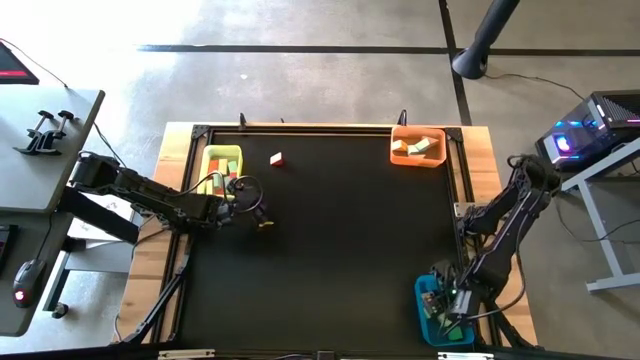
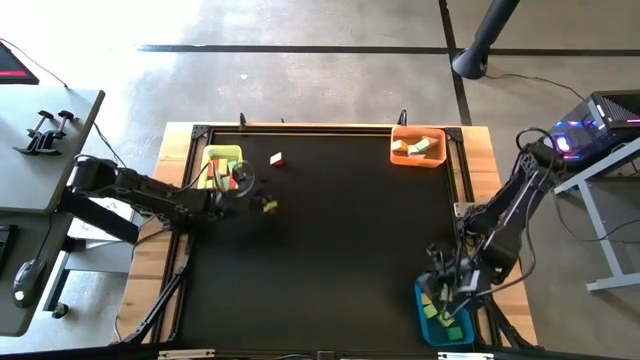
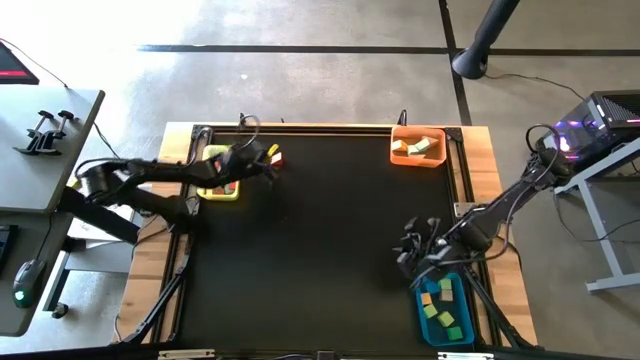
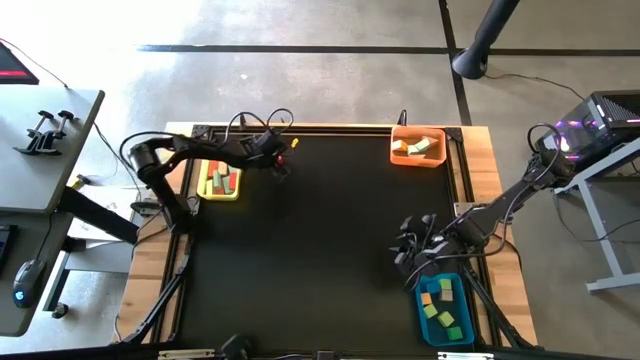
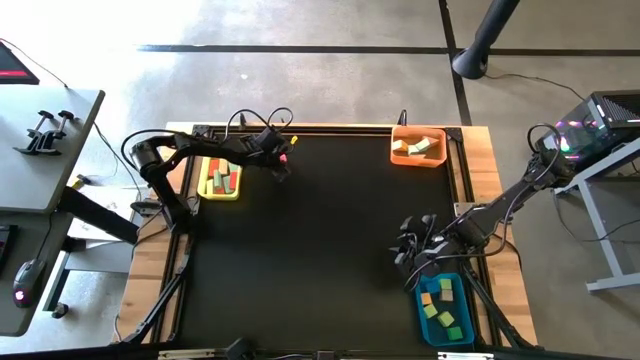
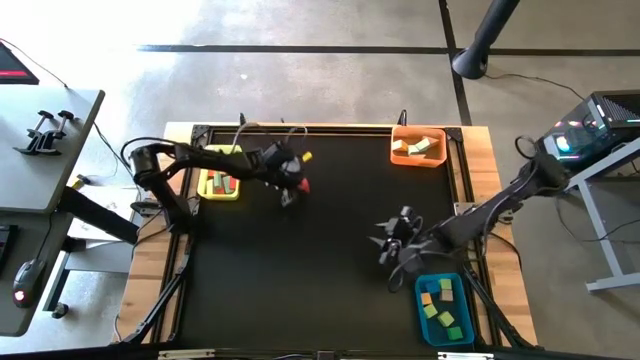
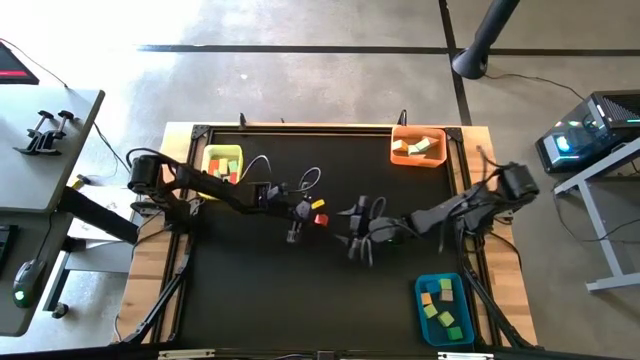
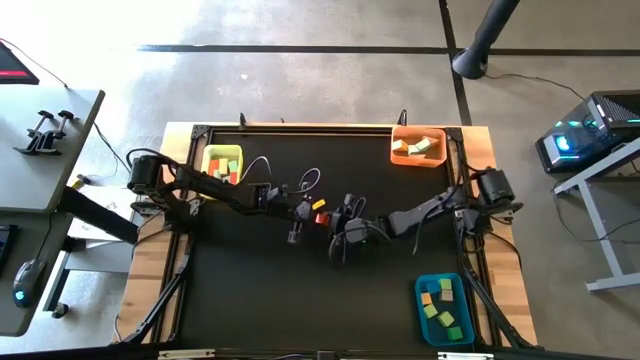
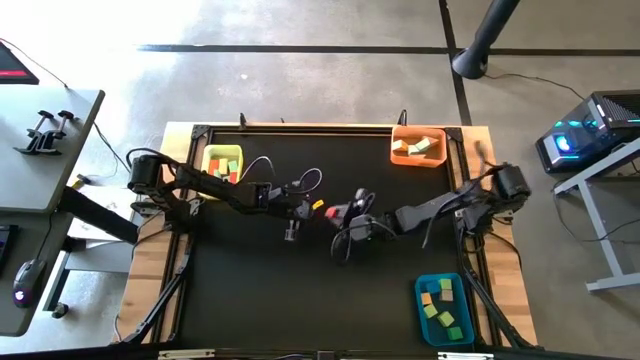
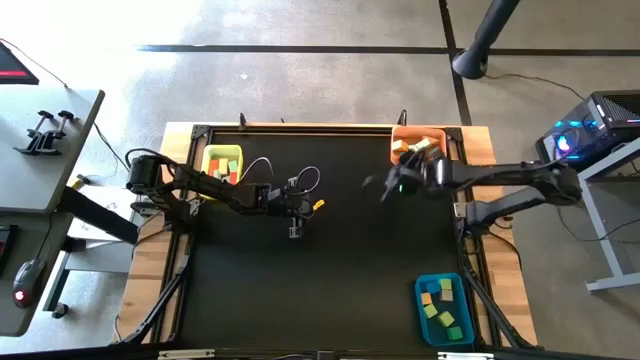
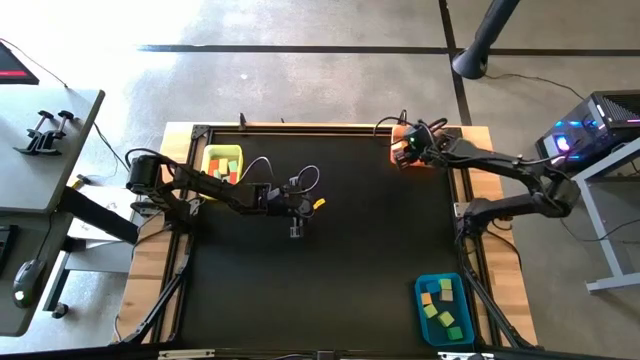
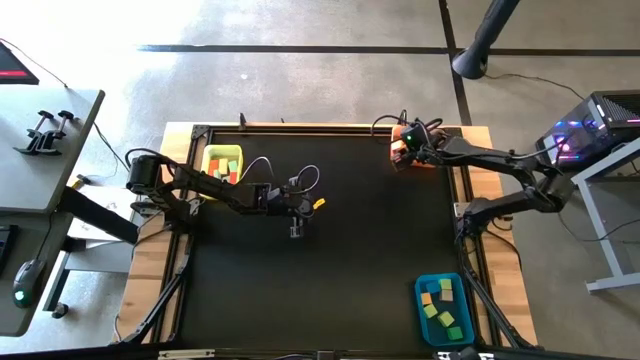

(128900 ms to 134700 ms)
Task: Sort blocks by size
Put the orange triangular block into the orange bin

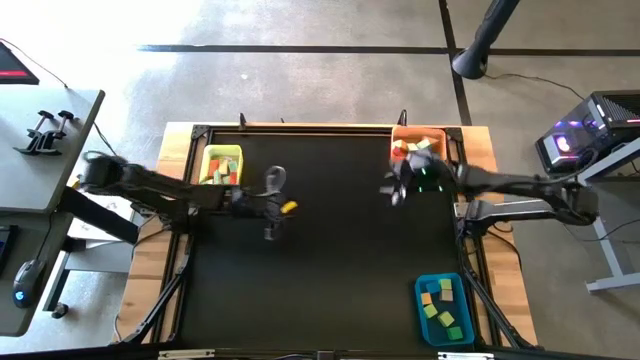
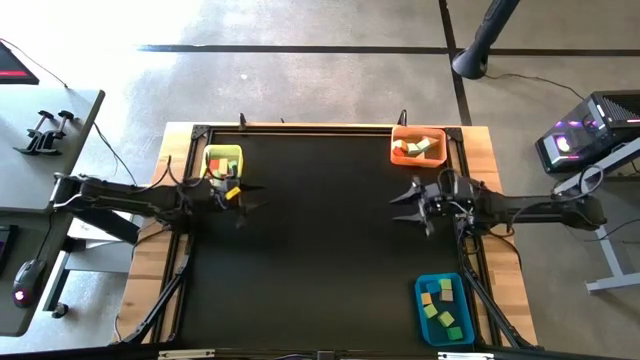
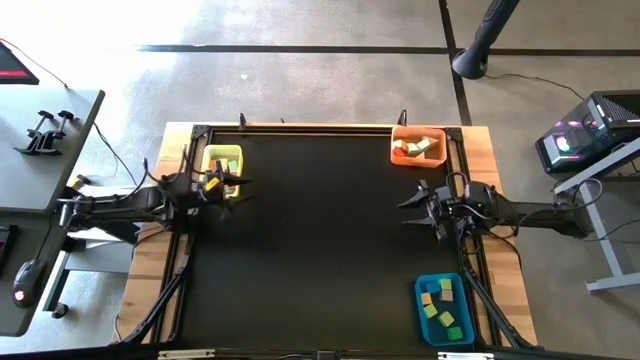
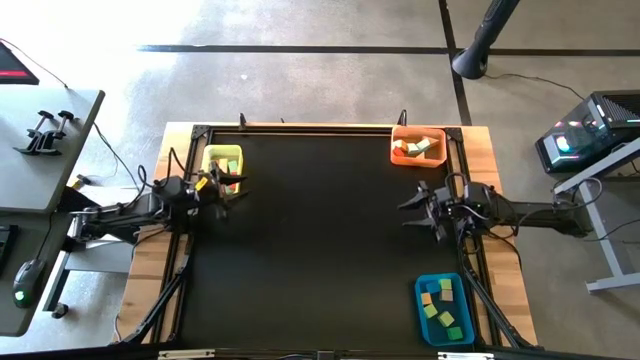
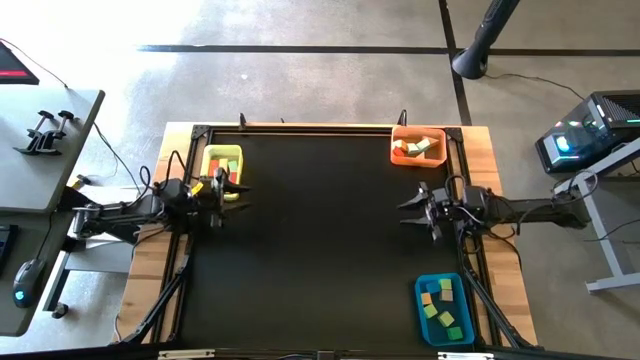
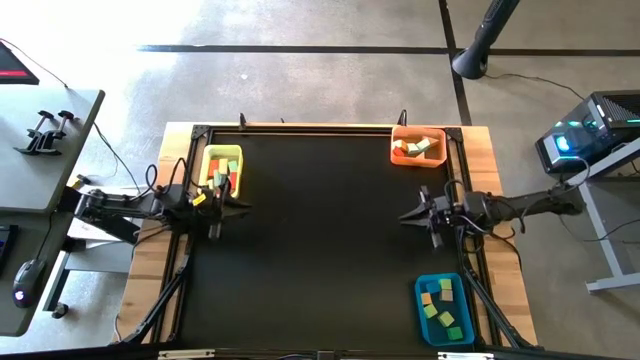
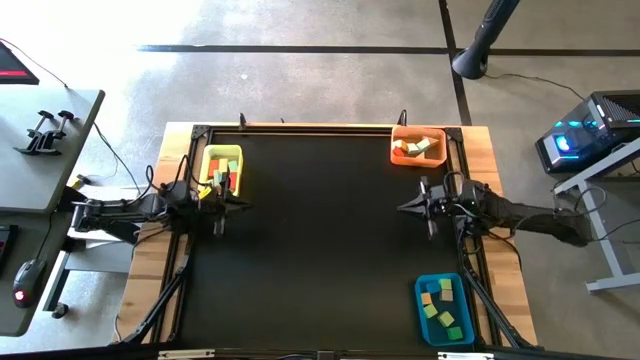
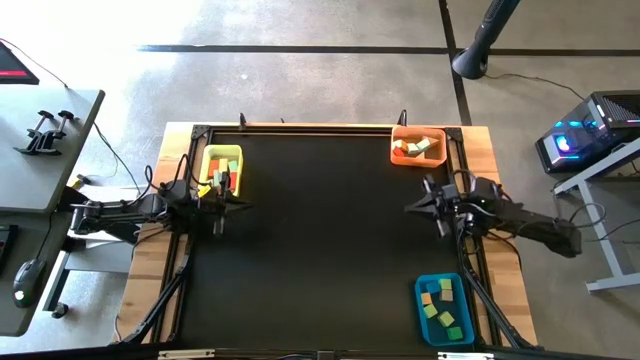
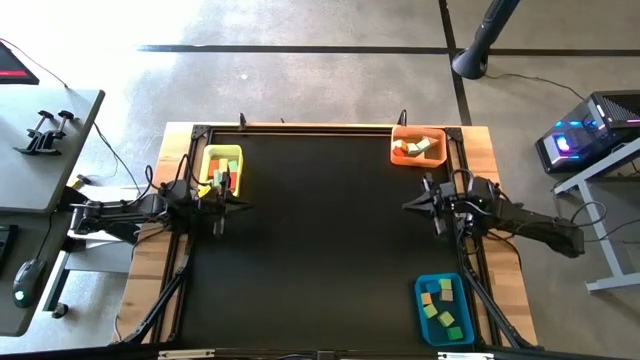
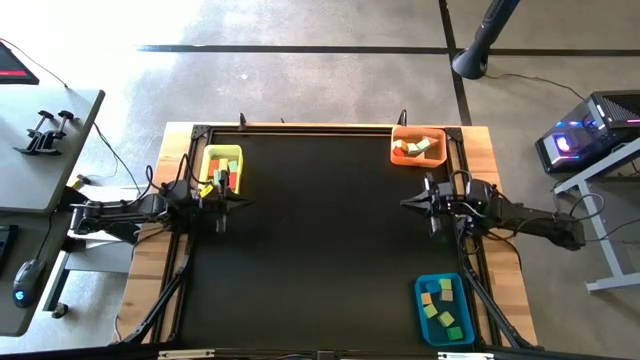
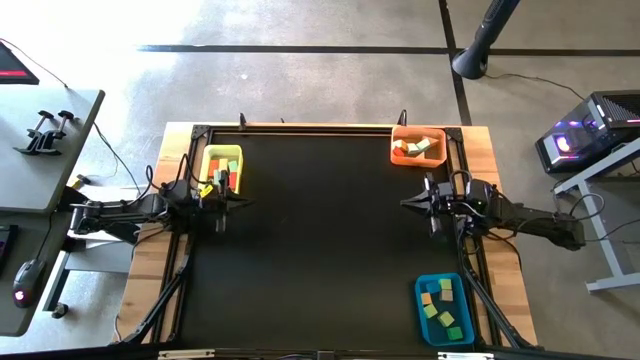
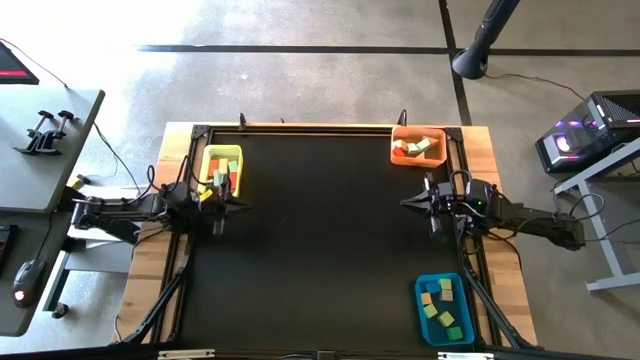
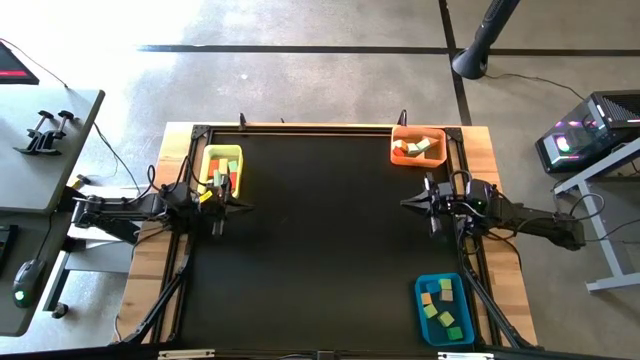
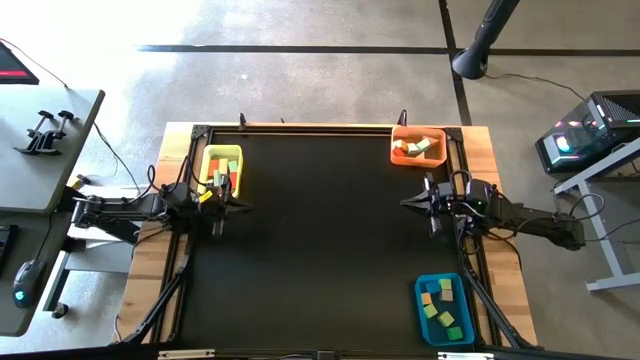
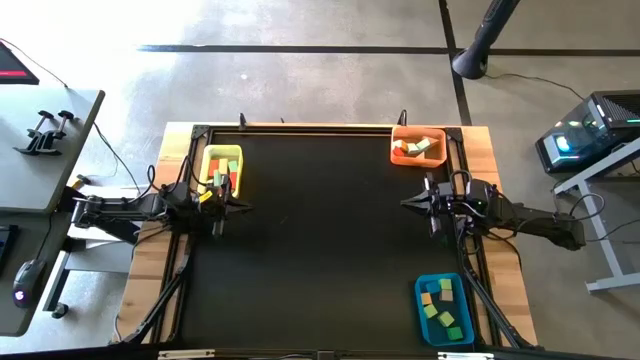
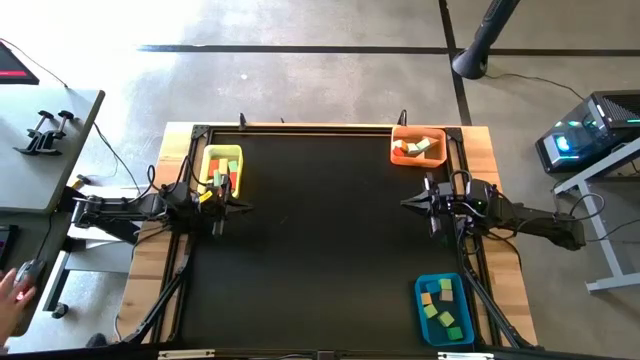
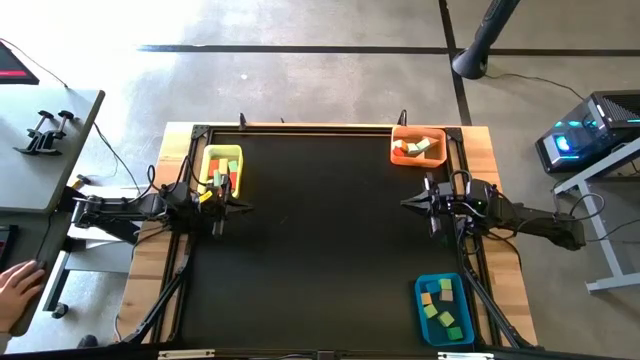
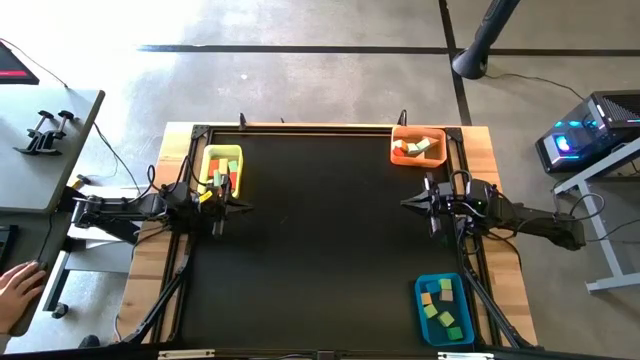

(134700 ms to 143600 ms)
Return to Home Position
